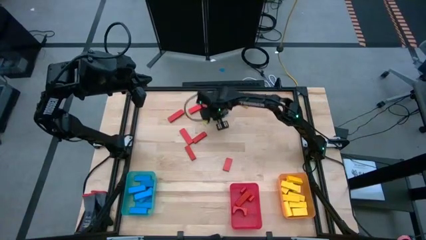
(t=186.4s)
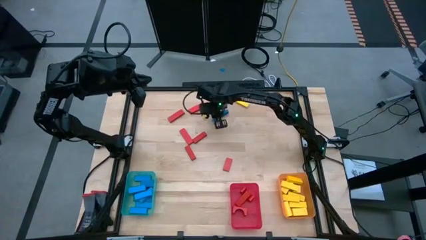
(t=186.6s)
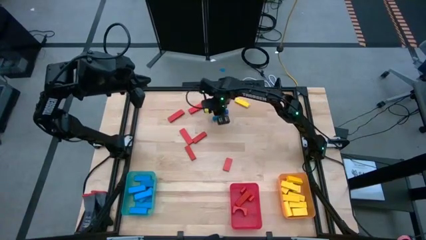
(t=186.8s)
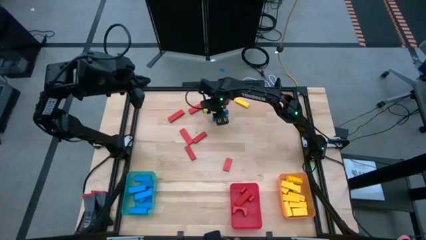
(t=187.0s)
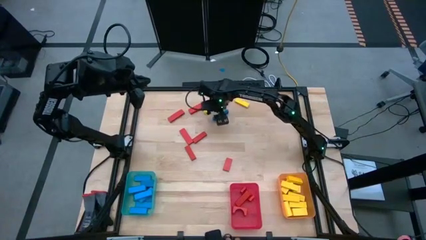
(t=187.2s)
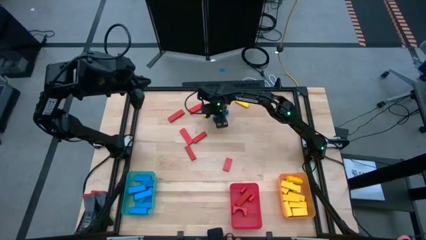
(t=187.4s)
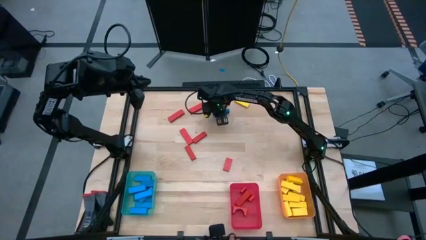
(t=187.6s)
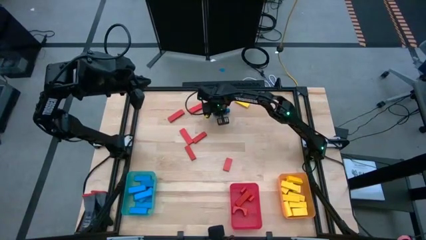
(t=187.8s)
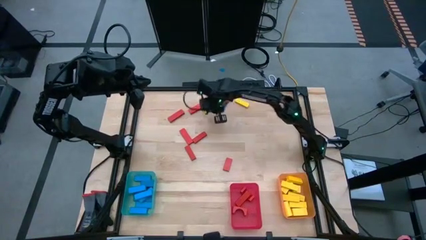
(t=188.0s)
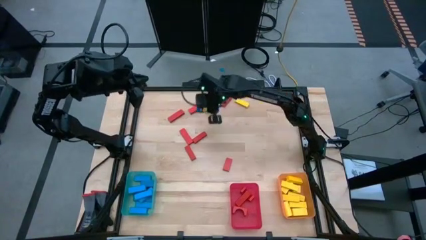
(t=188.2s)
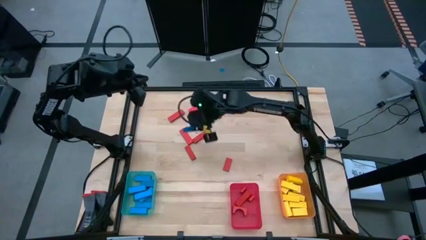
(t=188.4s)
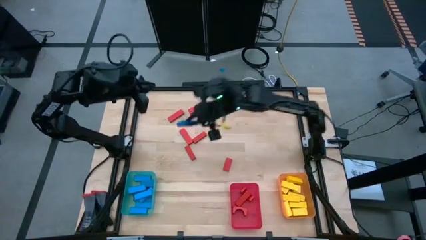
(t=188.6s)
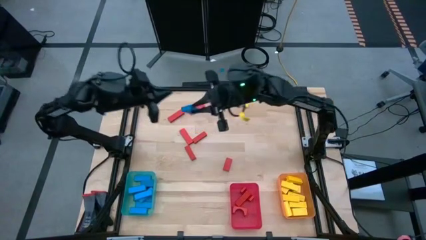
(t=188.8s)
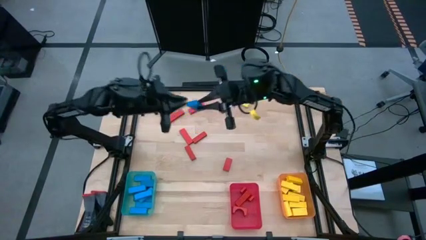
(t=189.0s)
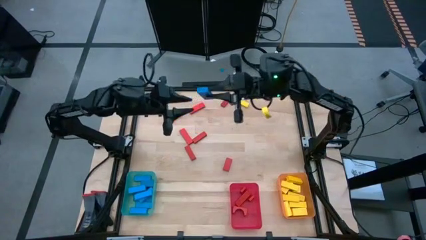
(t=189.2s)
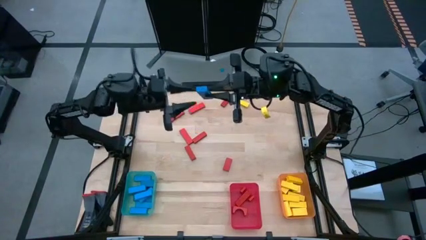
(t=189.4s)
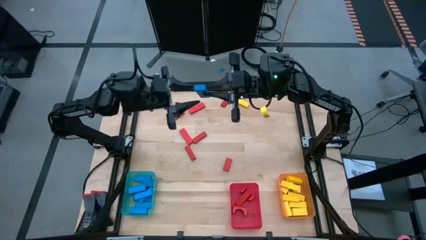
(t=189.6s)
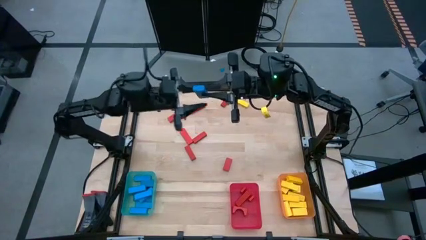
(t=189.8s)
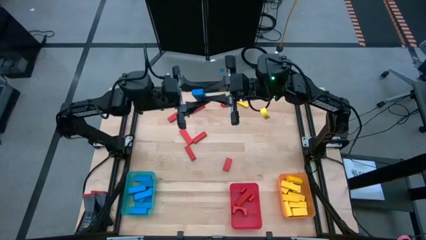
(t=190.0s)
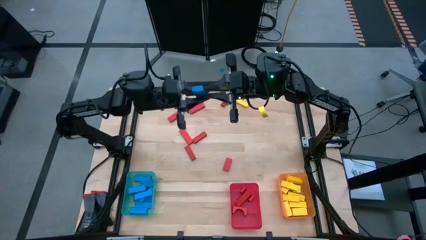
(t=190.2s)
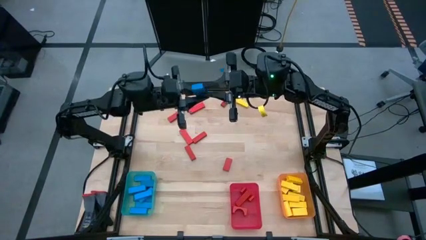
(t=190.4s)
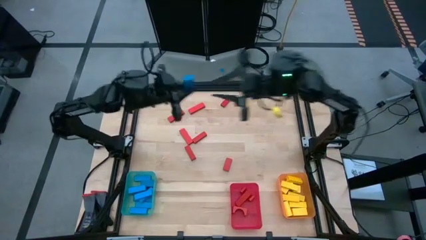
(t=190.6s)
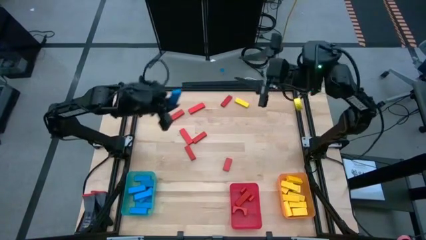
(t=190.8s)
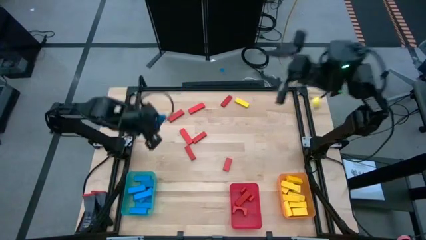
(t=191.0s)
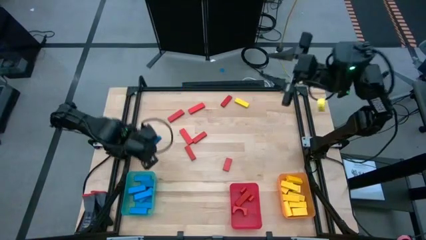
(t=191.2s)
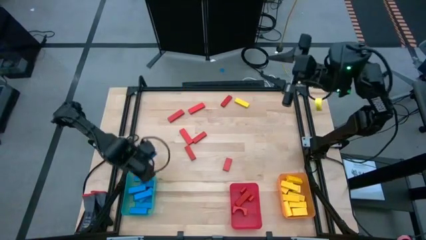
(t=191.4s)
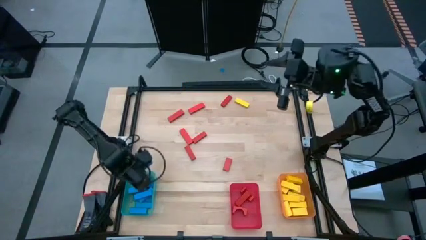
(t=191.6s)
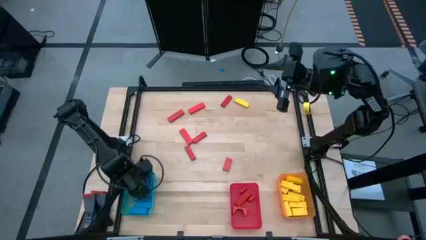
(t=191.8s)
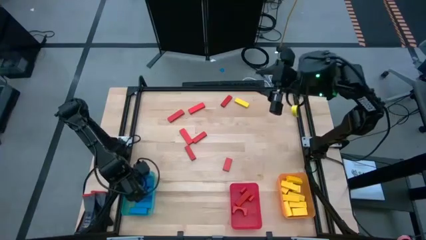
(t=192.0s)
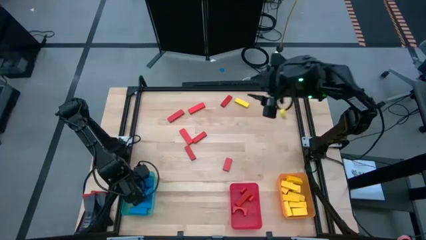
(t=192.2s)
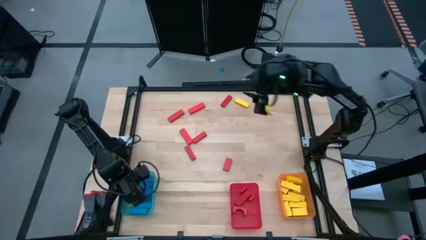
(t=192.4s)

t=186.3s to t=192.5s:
Task: Sort blocks
Put the blue block into the blue bin

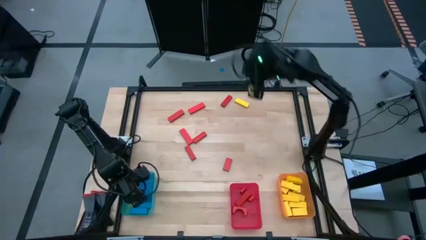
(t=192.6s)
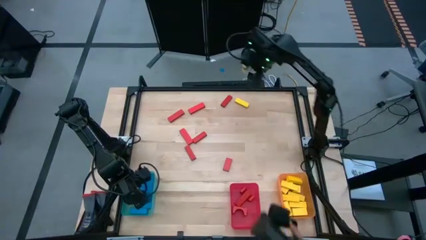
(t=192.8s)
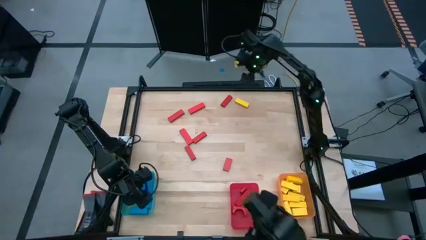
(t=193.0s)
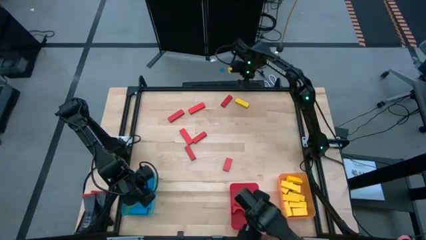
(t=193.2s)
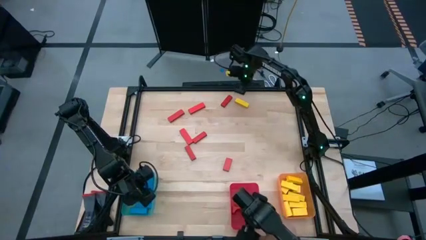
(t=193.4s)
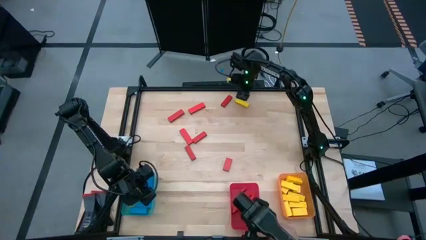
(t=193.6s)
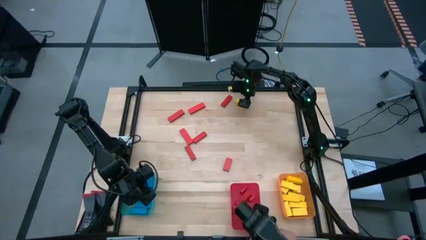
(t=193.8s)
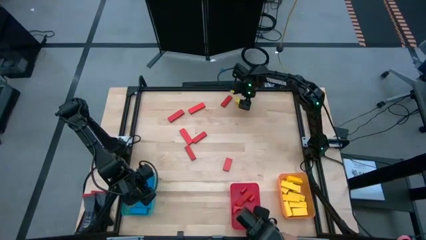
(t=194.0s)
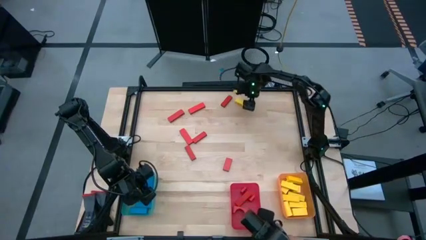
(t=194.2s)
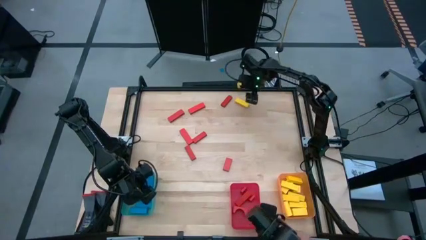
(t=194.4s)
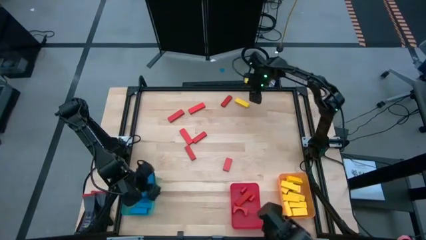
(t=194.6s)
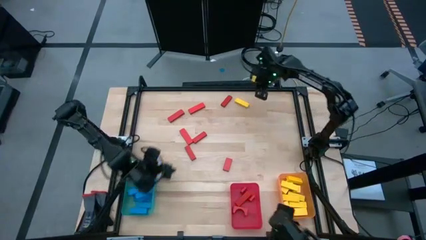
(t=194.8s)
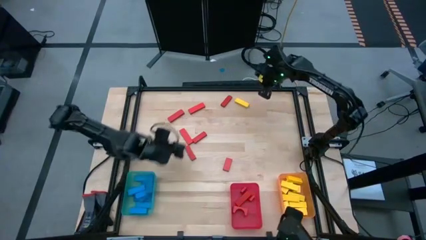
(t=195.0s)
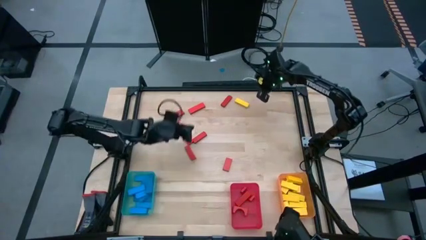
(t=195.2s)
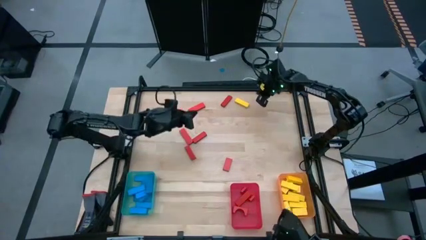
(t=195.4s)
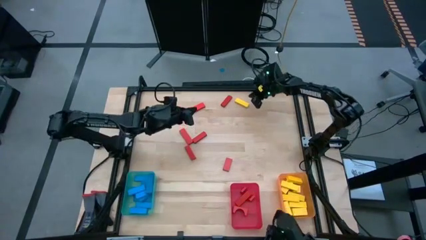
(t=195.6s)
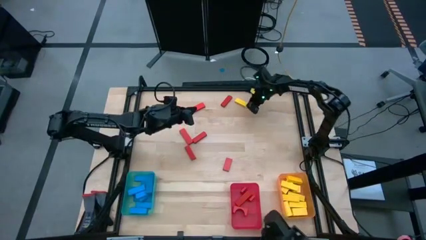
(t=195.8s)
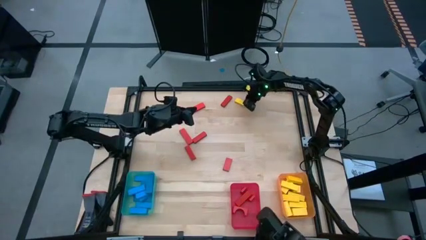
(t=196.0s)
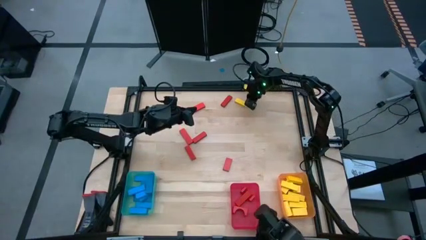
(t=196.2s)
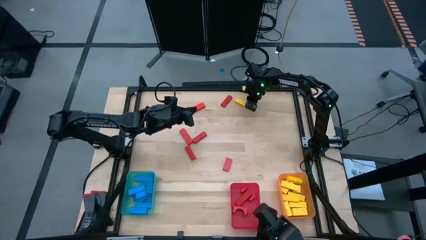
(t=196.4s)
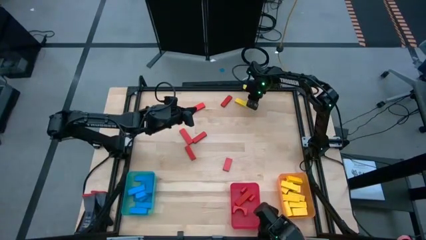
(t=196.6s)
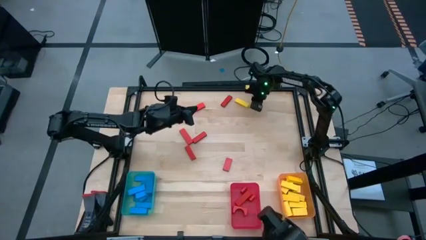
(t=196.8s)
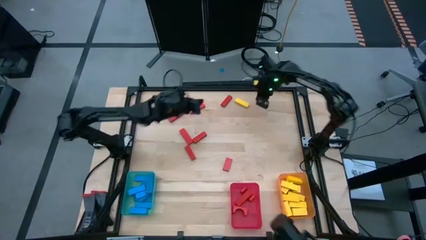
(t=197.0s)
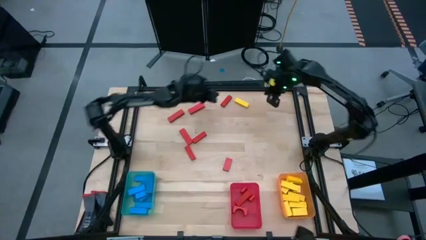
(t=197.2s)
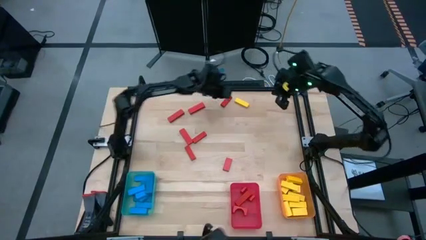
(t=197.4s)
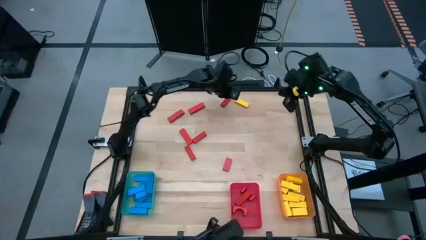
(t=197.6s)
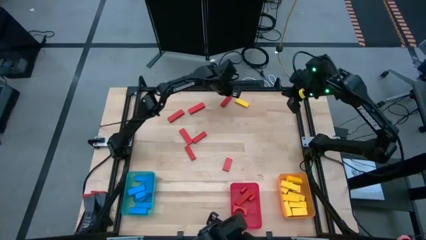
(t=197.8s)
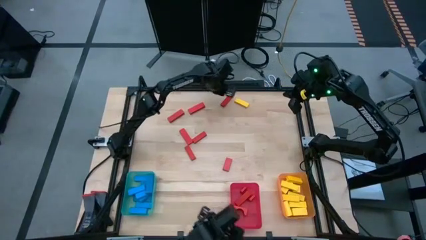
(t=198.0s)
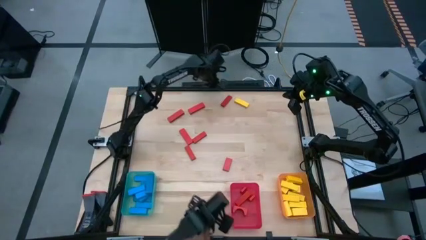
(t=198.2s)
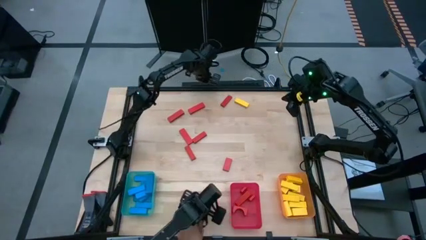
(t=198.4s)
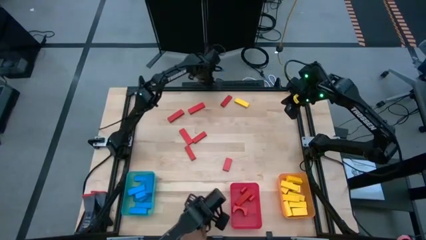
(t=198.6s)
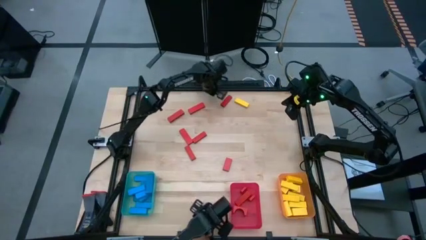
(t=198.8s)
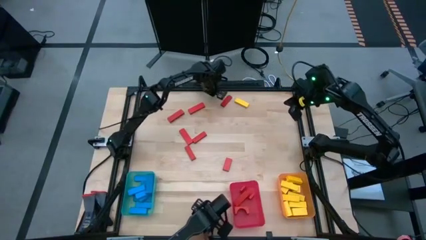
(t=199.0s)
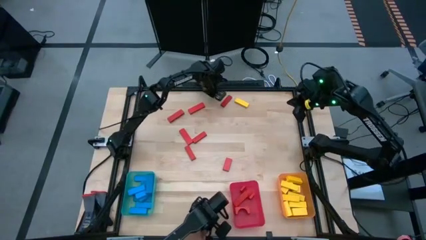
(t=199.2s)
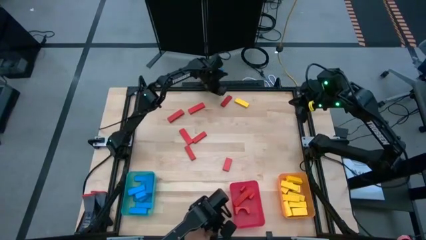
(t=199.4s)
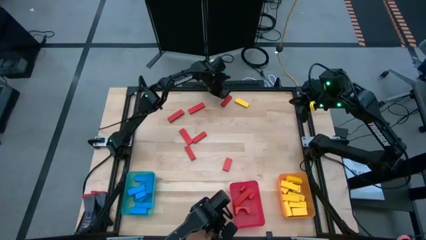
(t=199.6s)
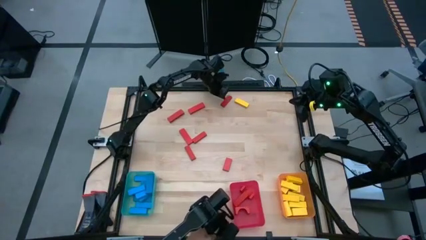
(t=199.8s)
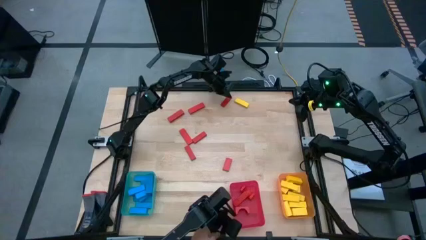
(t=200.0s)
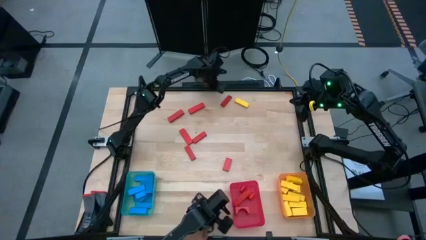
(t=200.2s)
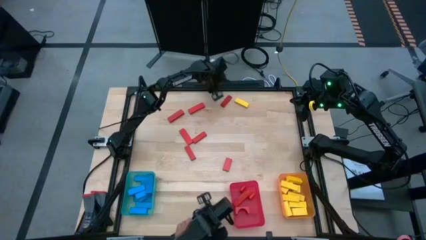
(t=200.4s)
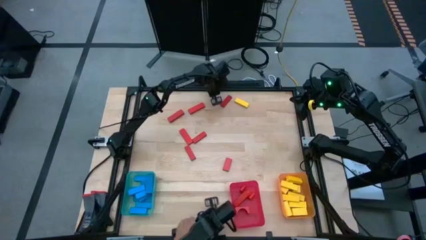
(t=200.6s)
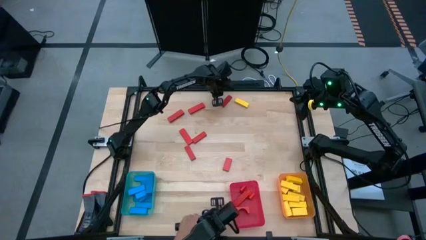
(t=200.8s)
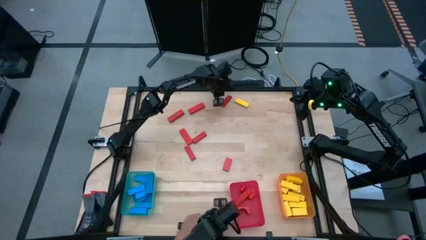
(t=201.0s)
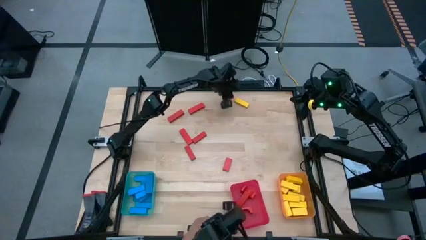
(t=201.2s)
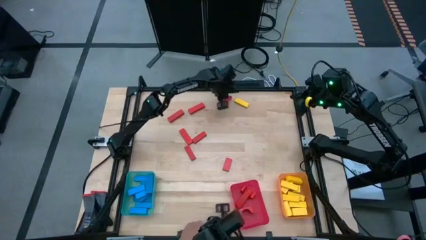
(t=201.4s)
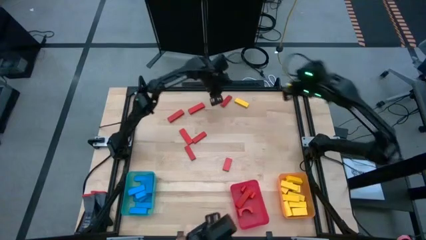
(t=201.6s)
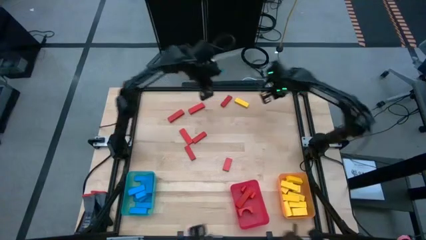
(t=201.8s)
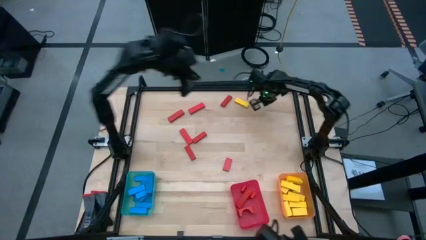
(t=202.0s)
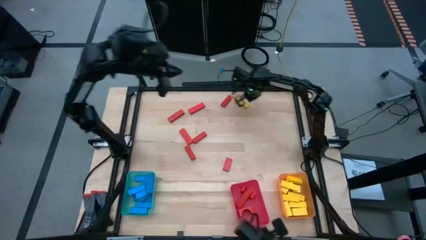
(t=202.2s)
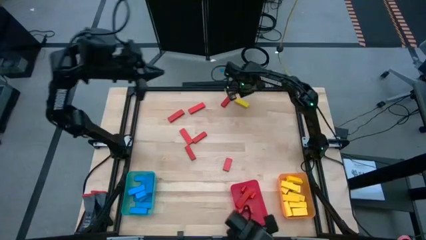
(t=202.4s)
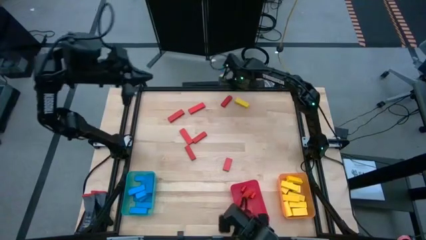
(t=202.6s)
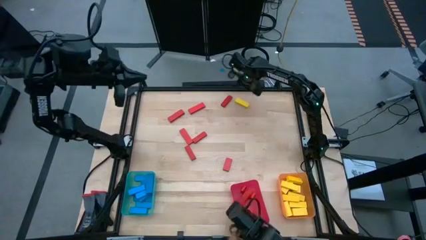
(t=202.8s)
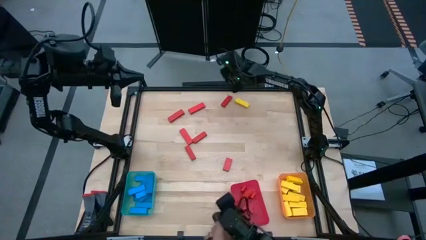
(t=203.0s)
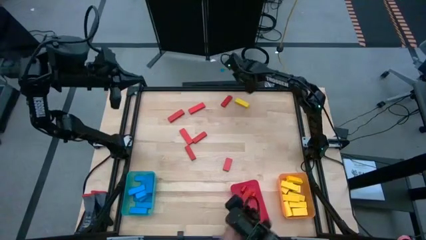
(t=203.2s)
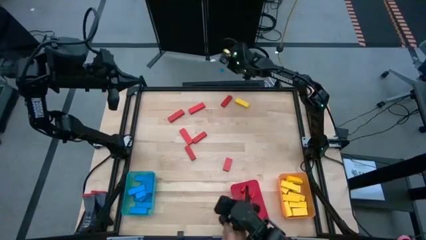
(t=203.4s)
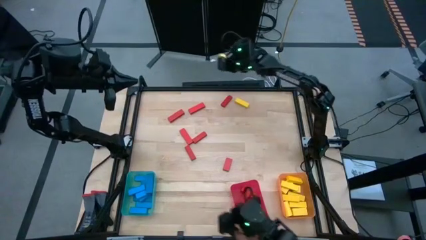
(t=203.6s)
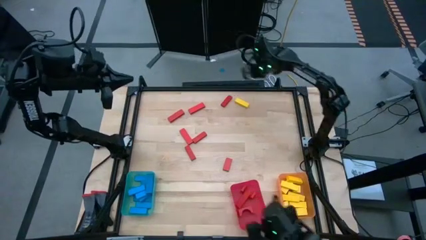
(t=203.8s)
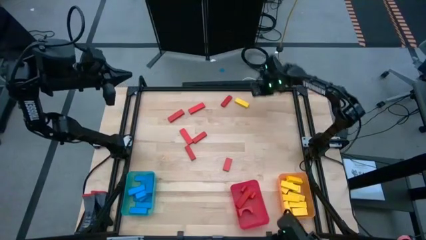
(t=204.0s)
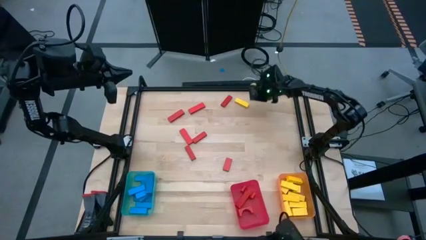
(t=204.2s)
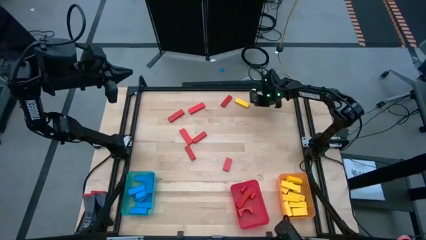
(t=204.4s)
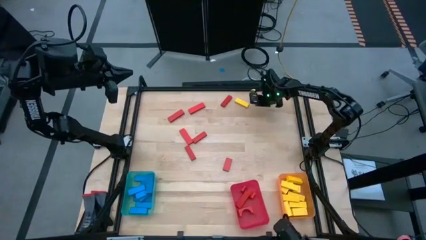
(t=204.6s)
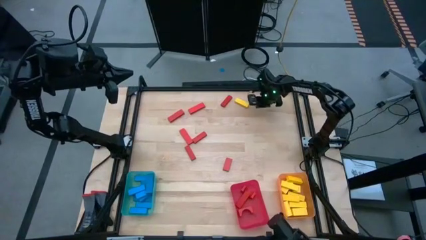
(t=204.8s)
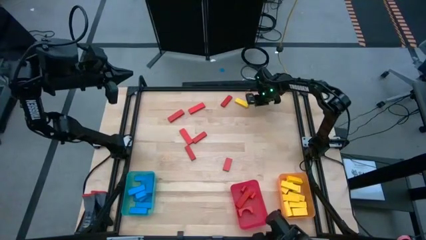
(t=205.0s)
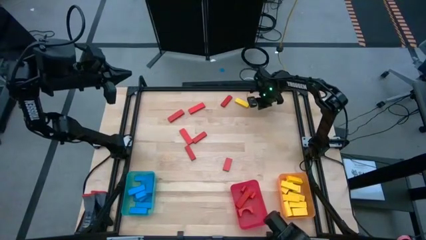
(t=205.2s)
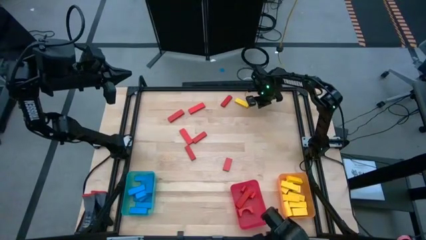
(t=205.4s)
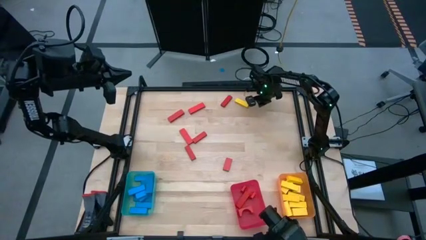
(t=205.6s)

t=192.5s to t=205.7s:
Put the yellow block into the orange bin
